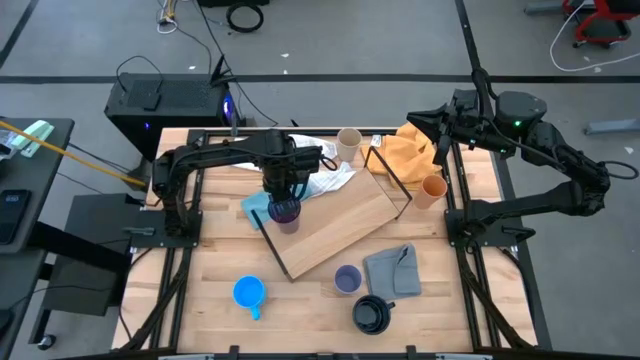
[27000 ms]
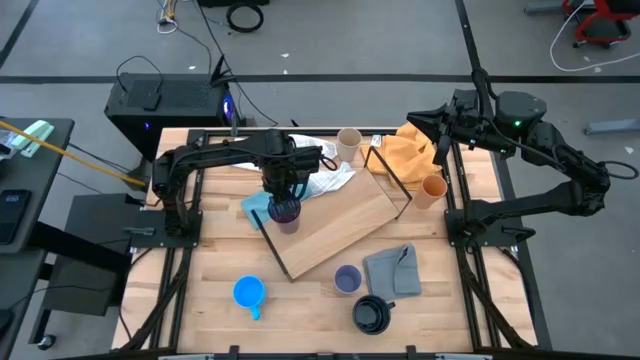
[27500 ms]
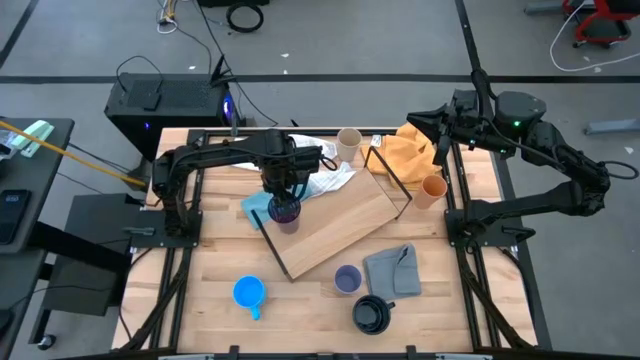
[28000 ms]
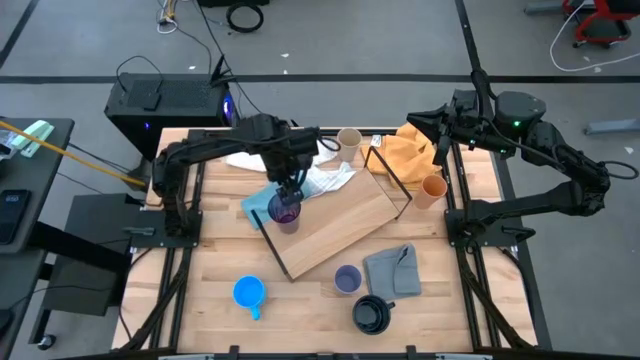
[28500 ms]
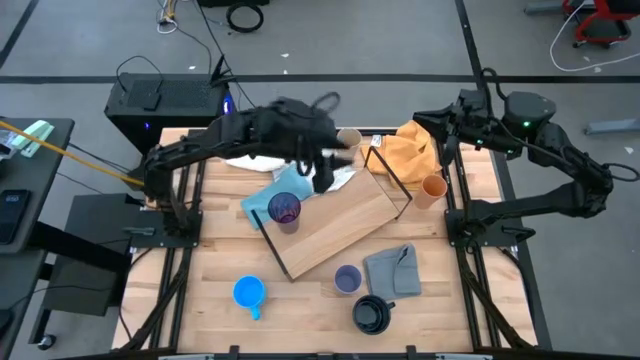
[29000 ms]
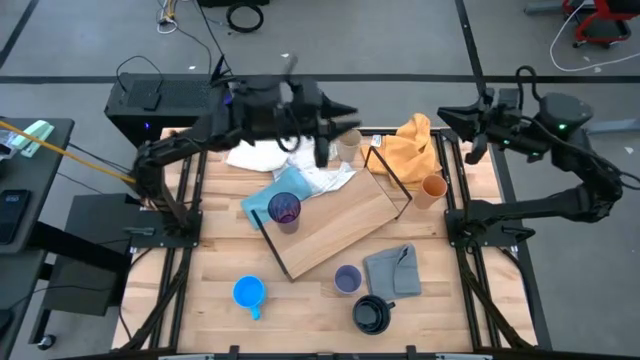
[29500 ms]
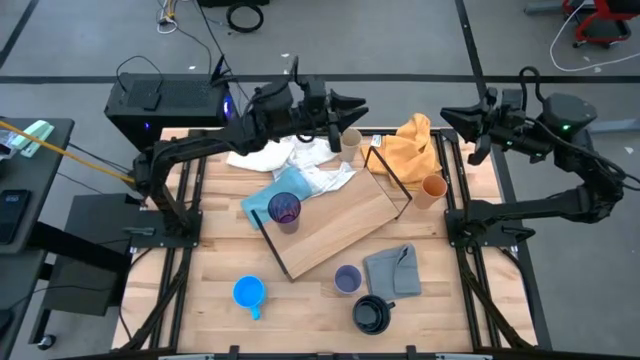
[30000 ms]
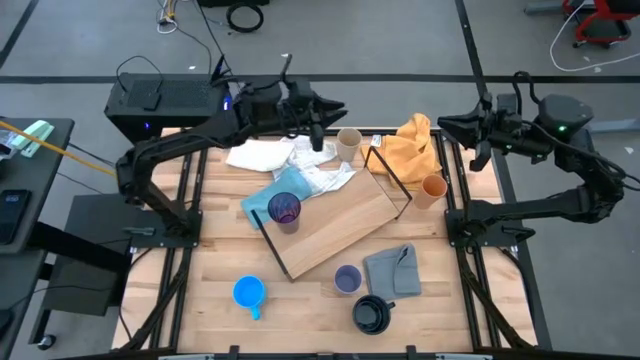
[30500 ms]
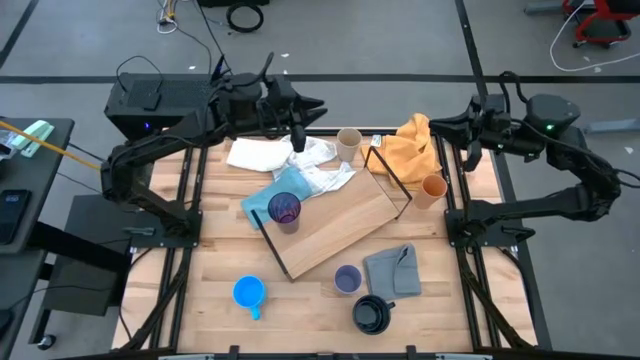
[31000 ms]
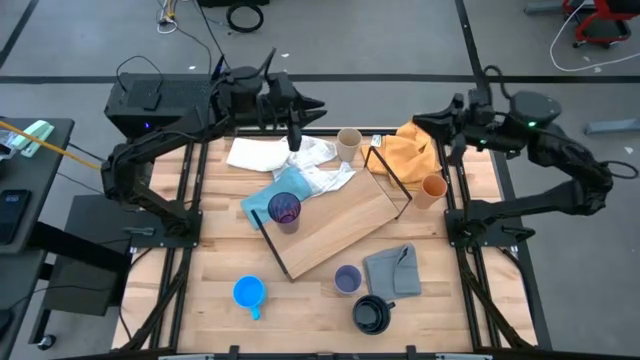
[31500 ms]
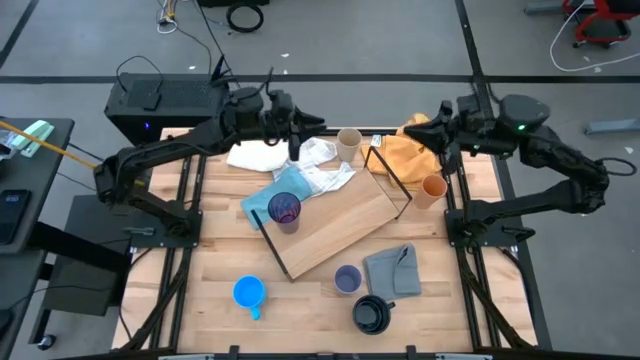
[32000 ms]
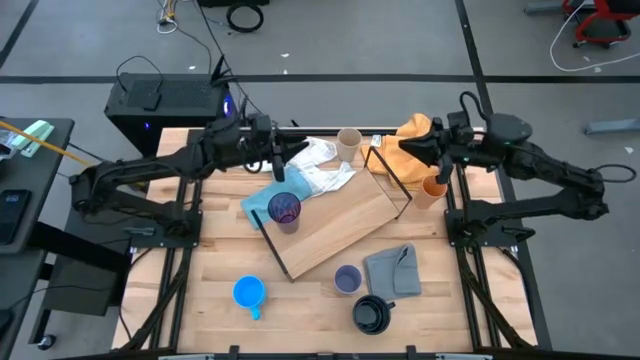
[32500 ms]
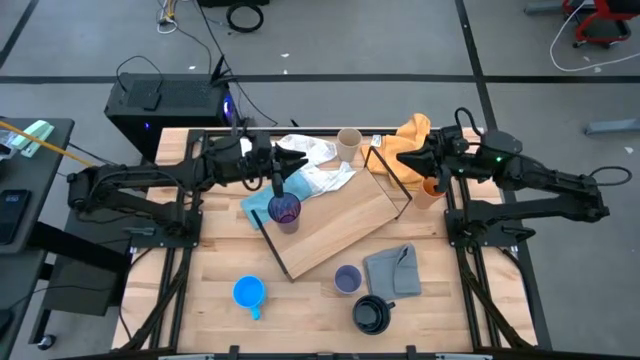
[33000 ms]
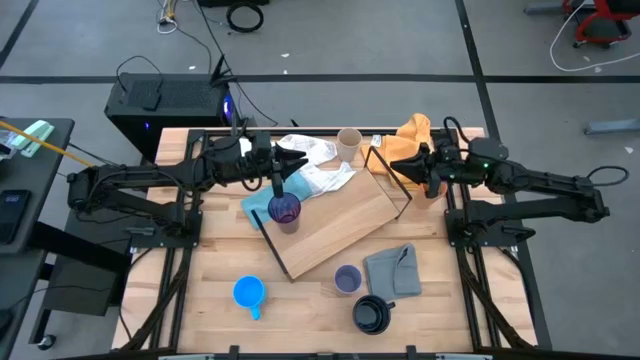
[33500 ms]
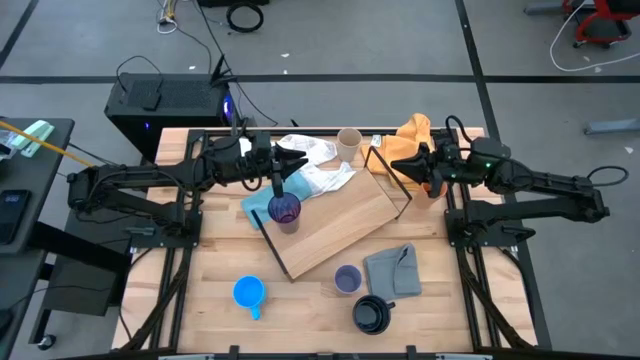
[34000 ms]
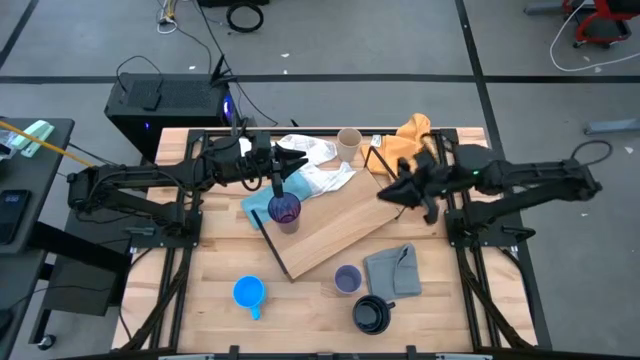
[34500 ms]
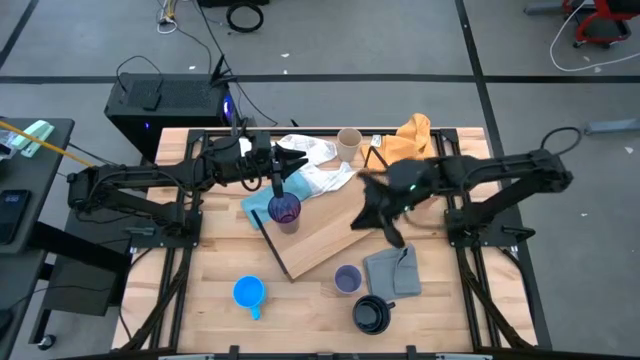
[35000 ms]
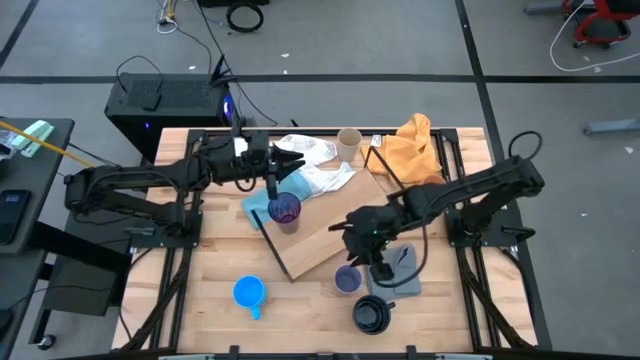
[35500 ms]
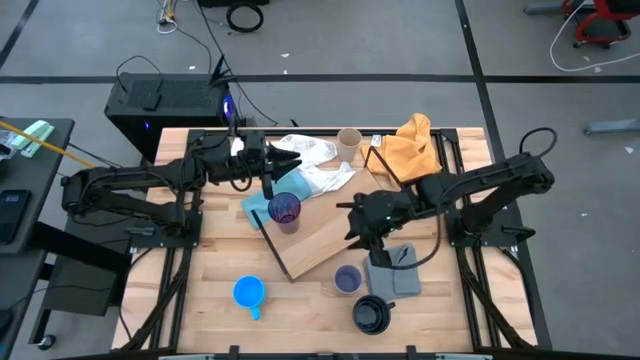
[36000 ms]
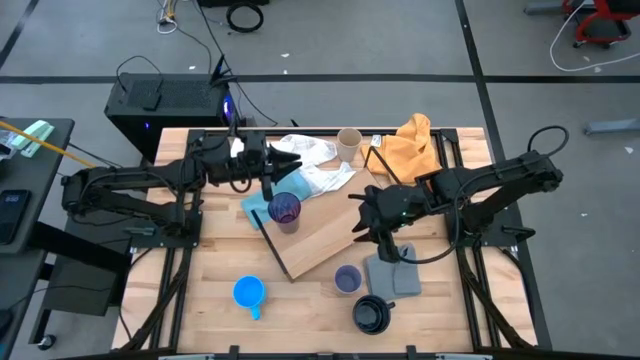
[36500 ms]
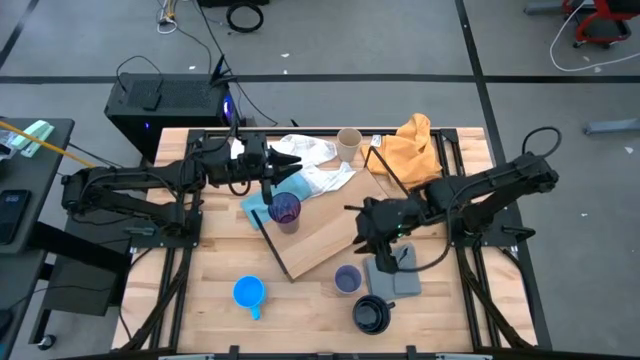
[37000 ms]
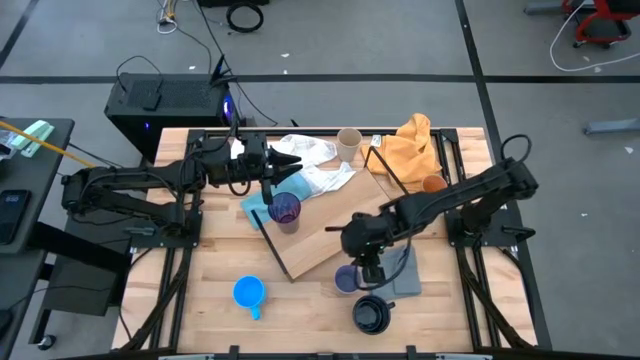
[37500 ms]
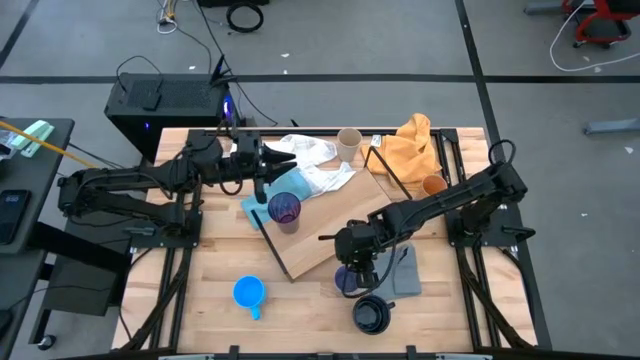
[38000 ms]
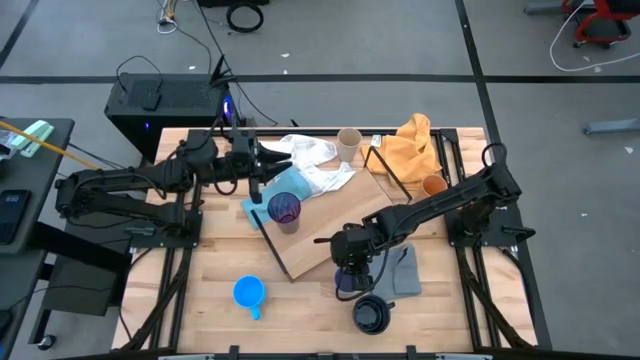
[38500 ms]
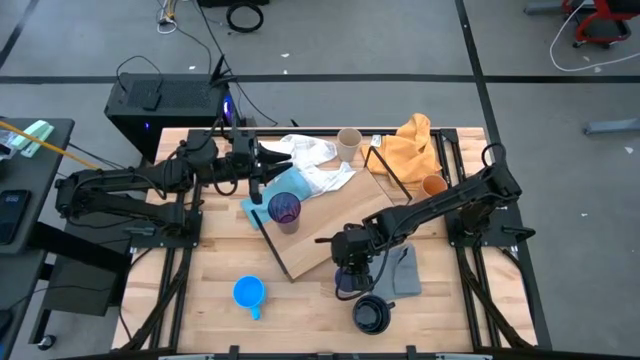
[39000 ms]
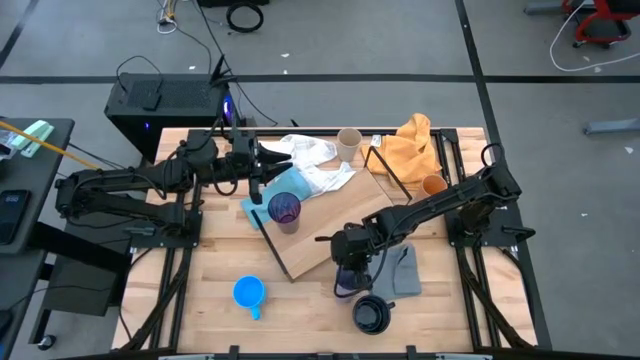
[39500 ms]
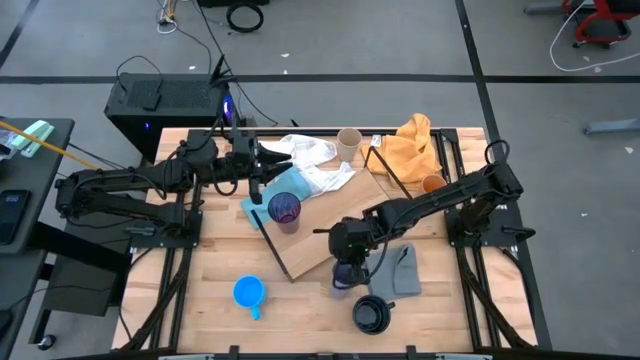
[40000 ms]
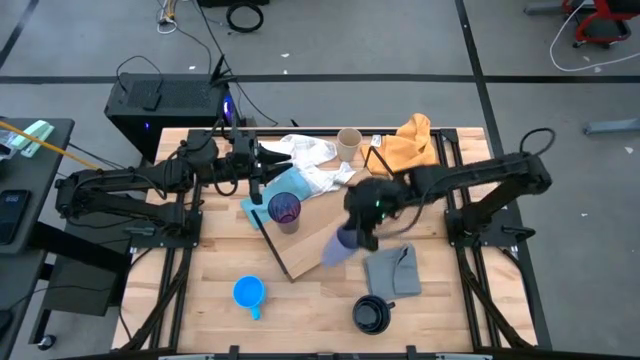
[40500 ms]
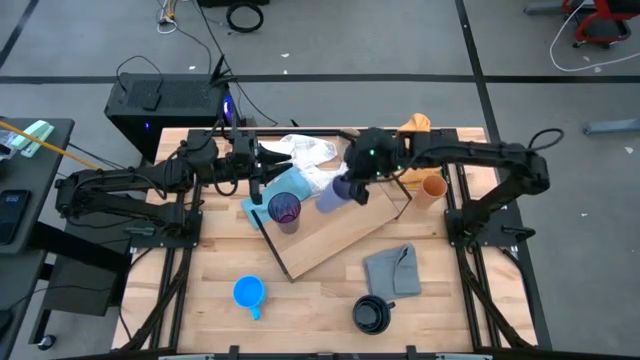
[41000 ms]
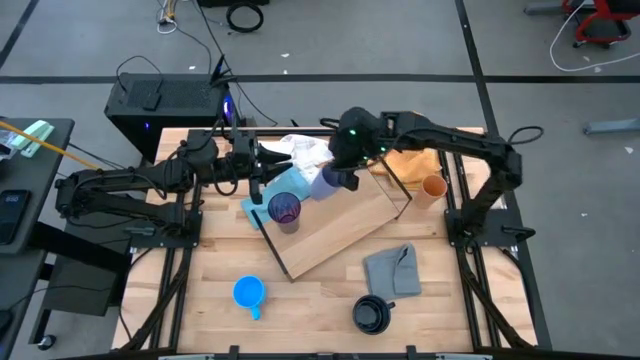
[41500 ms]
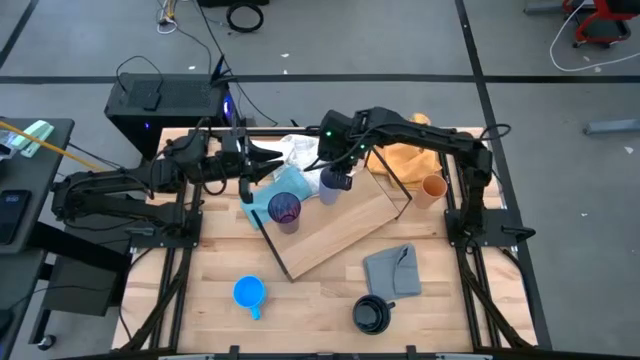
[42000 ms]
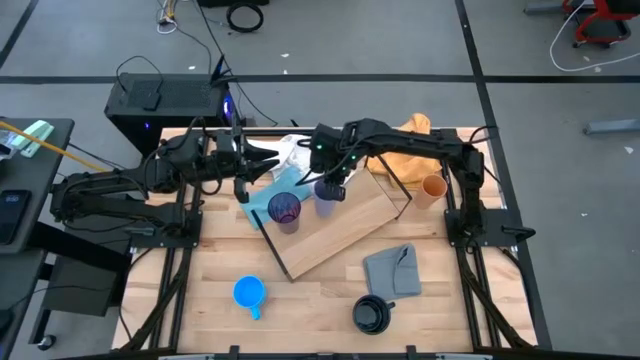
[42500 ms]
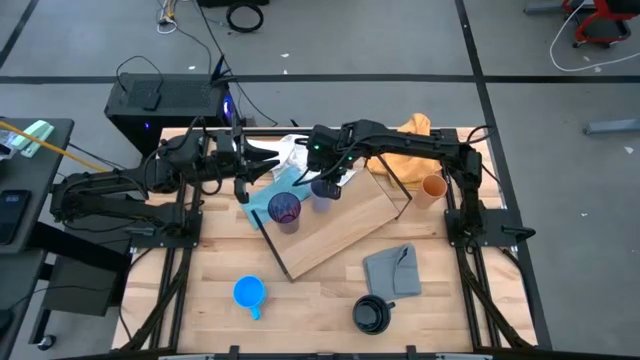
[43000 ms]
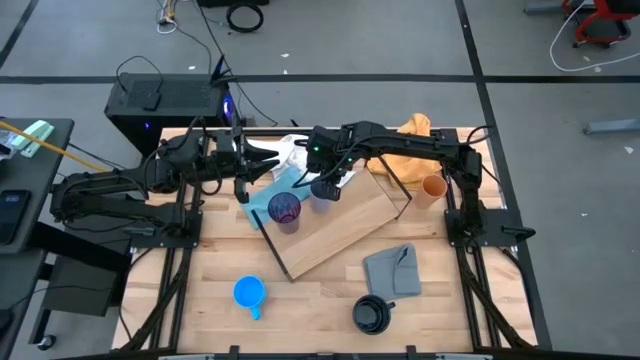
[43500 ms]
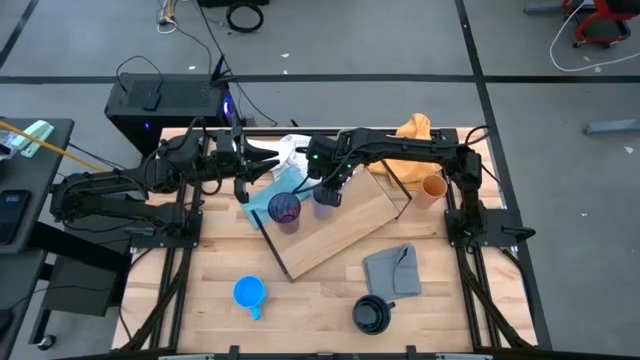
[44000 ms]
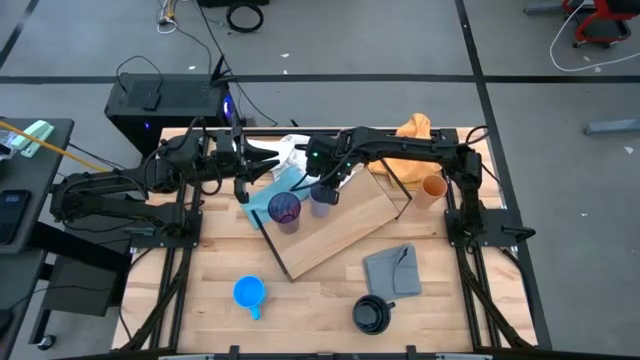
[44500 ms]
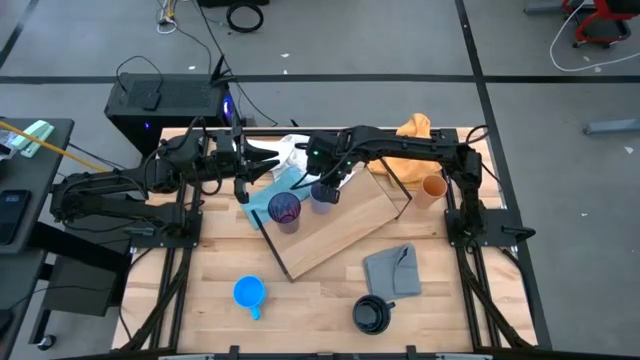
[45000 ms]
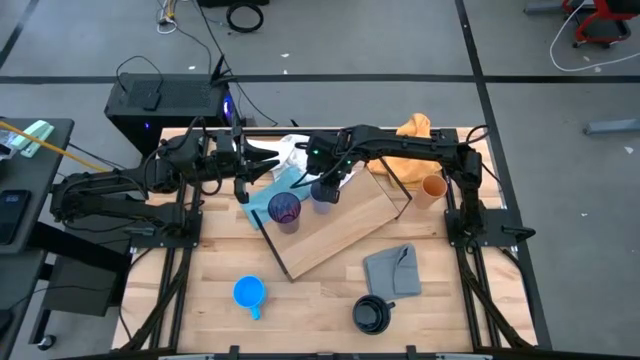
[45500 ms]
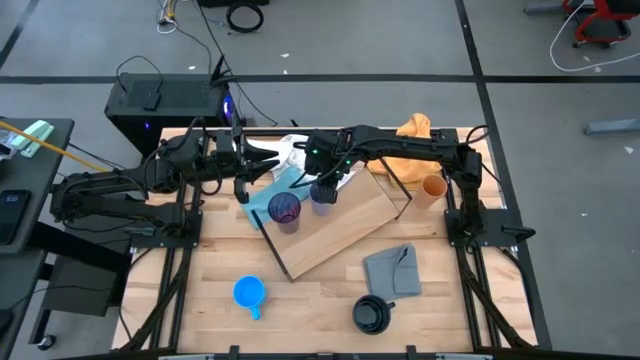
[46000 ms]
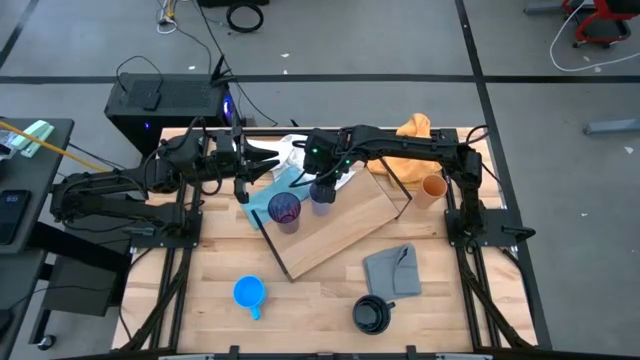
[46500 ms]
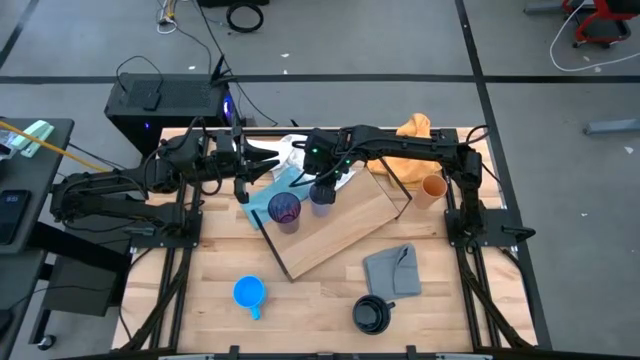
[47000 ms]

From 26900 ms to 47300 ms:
Task: Stack small to large cups/mugs on shelf
Put the light purple cup on the shelf
